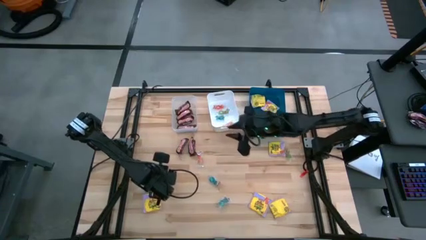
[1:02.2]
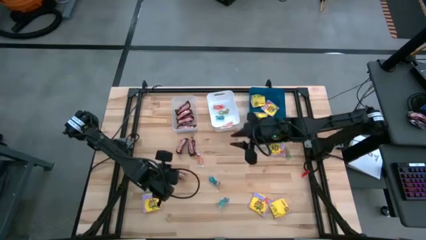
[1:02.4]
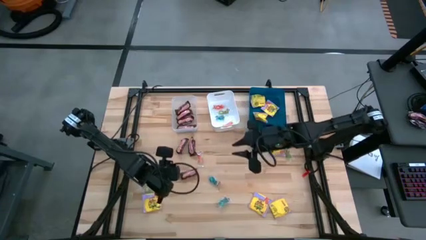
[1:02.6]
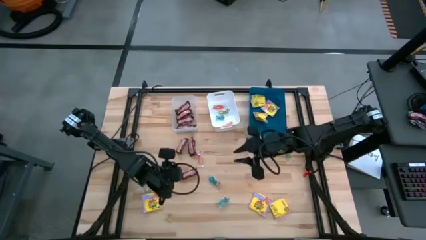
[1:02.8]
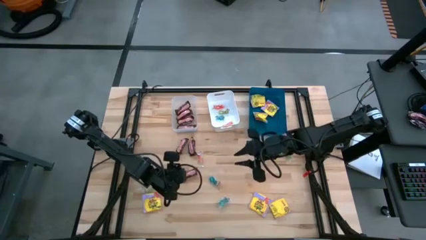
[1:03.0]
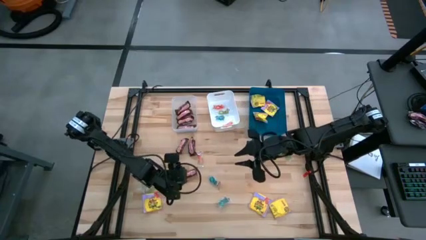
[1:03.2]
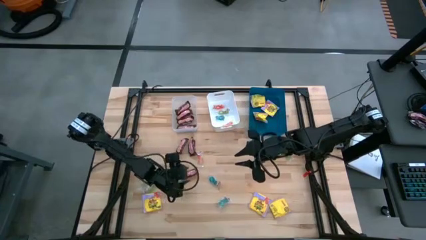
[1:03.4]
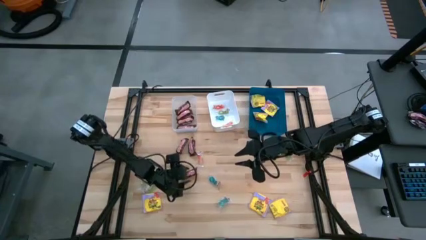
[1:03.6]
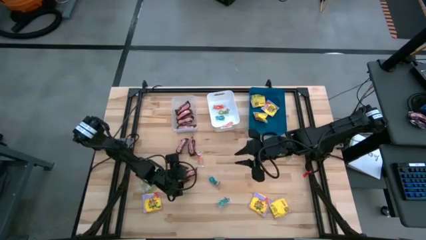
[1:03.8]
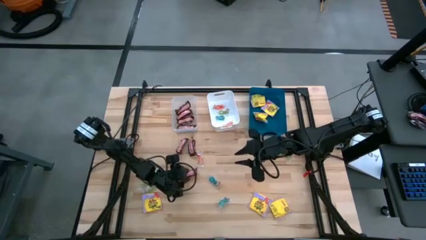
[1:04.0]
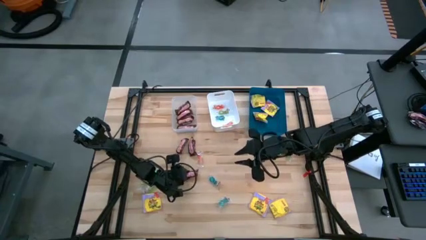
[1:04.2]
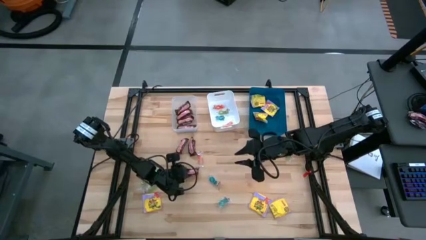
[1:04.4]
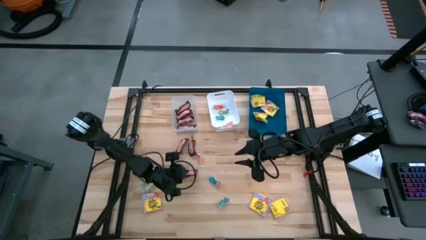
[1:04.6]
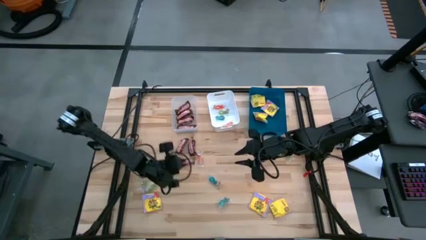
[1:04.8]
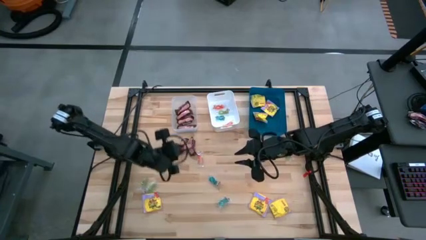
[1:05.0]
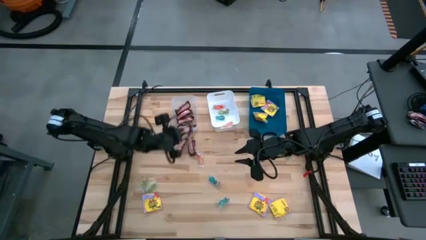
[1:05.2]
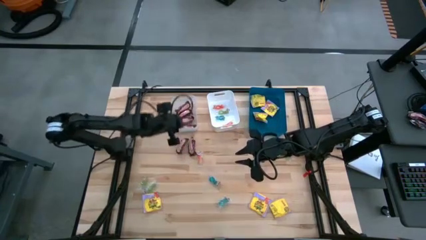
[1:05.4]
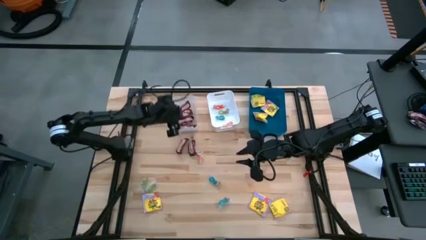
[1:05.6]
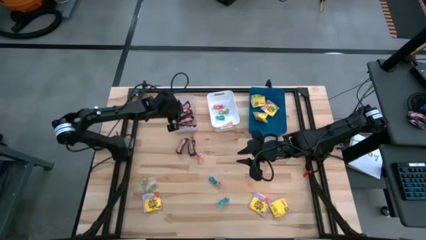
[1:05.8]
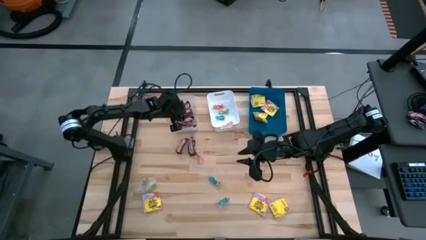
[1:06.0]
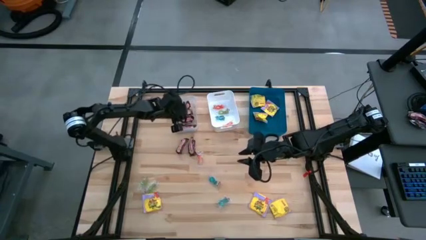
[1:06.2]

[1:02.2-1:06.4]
Task: Sort candy
Put the middle left brown candy bar into the transparent bin

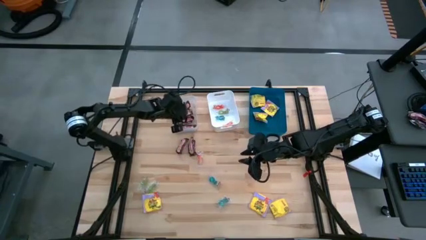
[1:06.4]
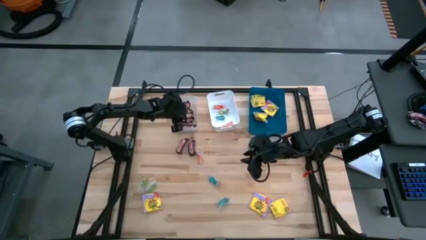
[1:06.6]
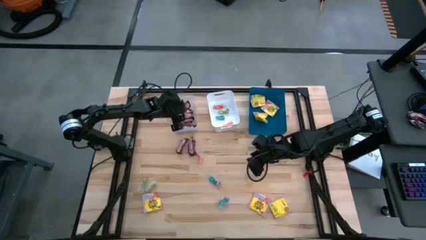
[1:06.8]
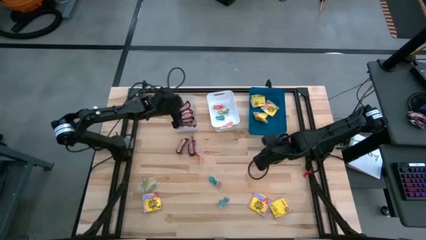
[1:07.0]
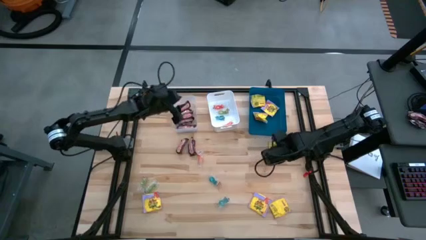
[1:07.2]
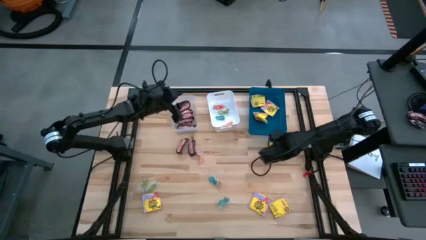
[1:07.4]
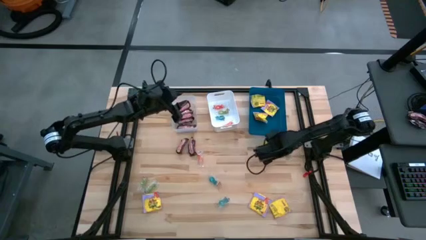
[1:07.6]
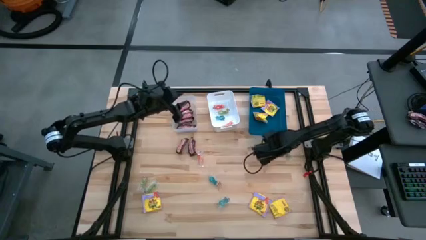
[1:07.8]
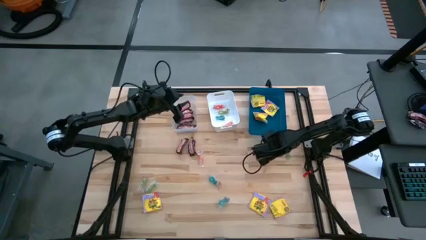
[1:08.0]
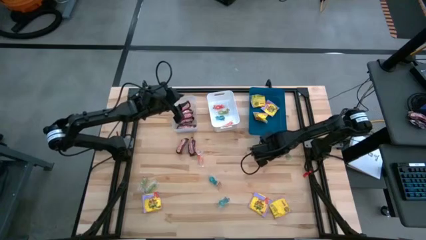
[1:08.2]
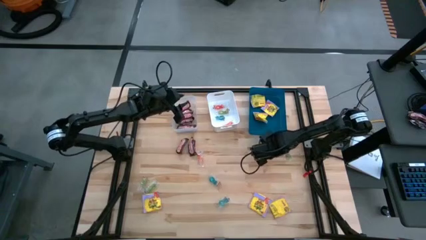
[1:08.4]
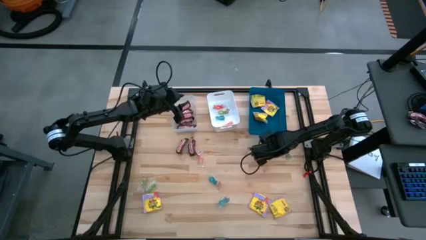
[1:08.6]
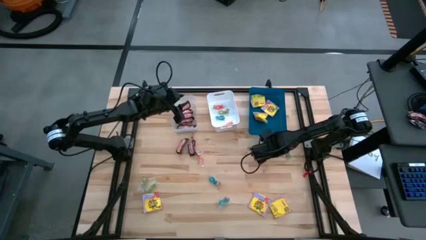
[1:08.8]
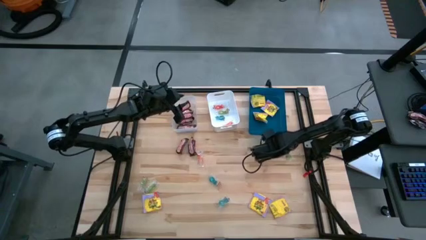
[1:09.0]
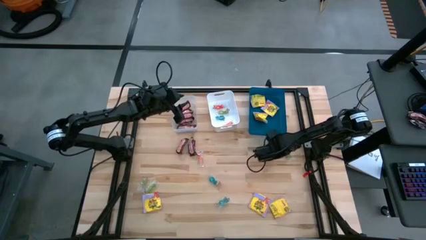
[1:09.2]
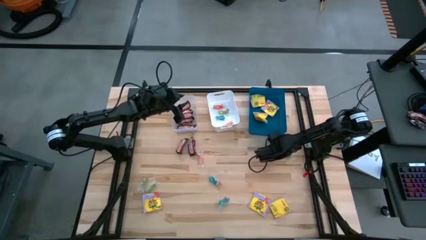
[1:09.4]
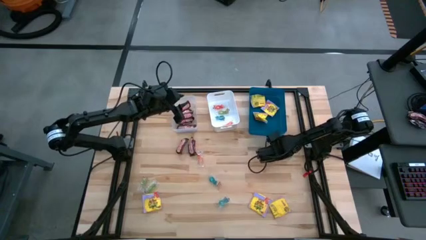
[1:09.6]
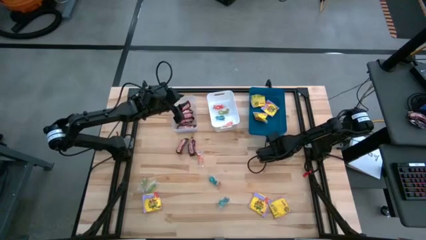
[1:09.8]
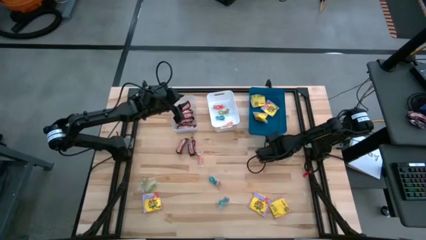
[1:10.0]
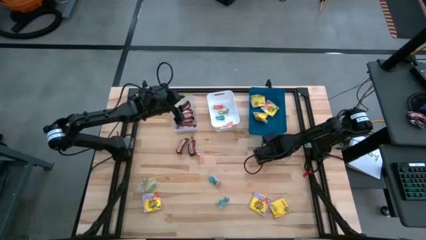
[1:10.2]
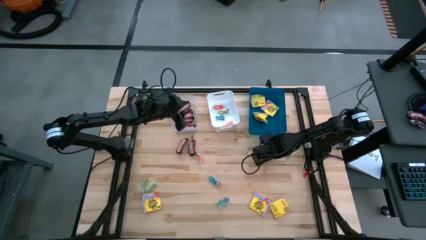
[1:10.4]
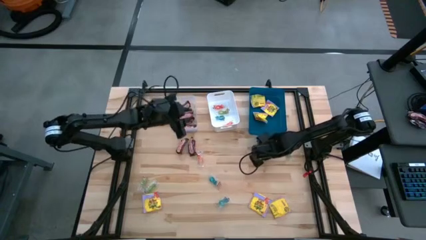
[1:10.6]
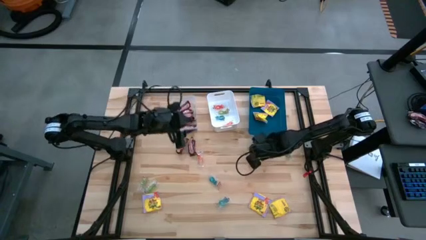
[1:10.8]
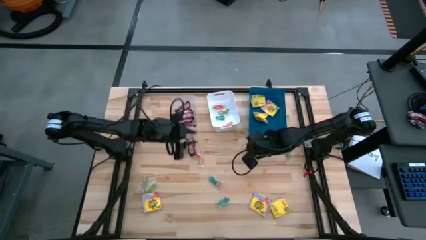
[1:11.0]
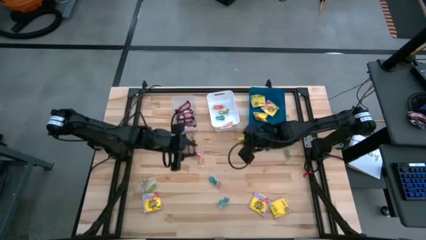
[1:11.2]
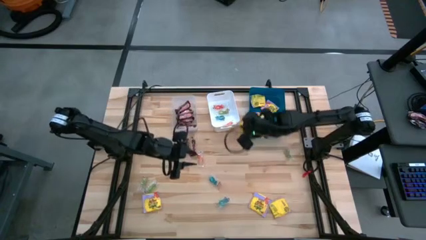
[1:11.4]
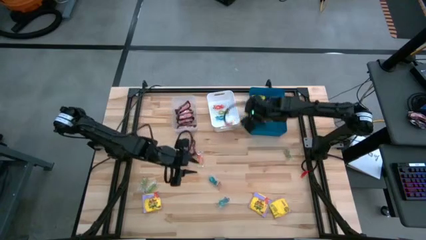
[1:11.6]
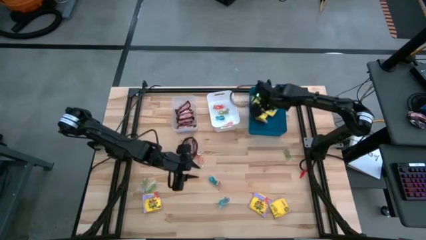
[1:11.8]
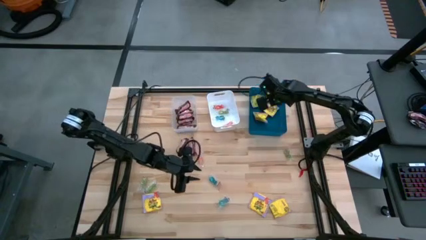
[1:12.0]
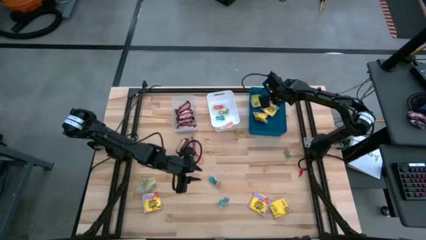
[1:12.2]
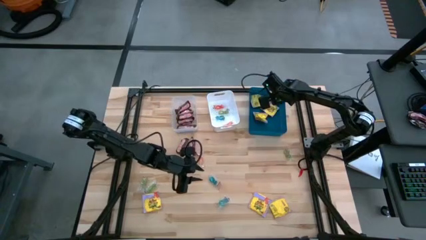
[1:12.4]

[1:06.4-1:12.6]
Put the top right yellow sour patch candy into the blue bin

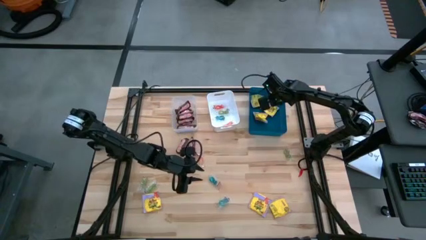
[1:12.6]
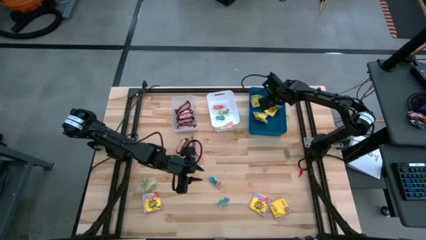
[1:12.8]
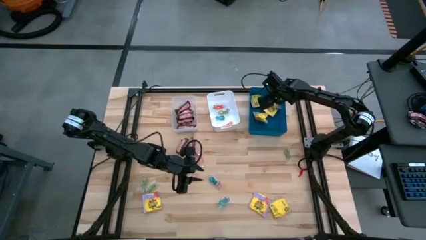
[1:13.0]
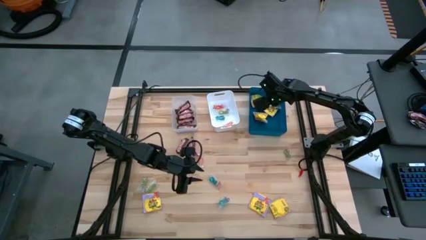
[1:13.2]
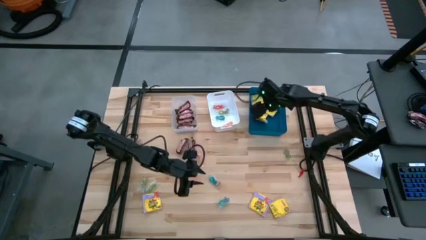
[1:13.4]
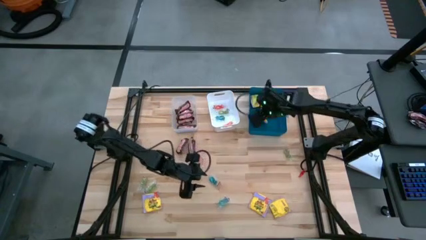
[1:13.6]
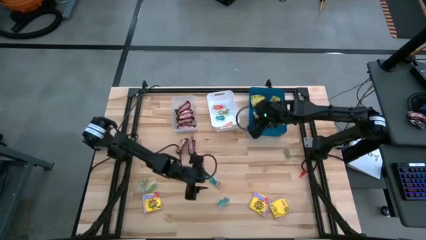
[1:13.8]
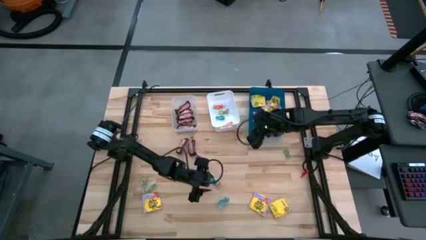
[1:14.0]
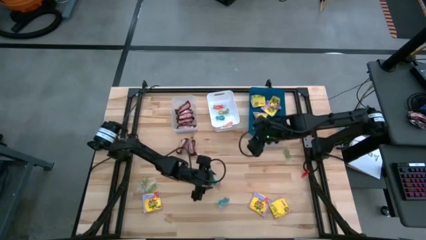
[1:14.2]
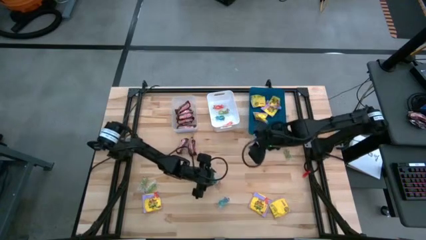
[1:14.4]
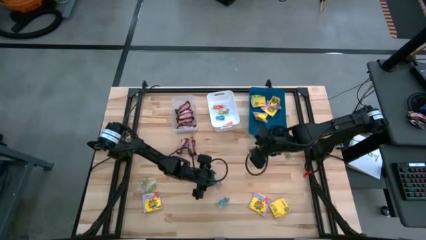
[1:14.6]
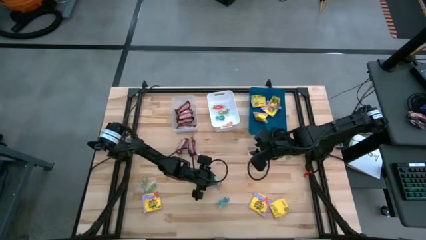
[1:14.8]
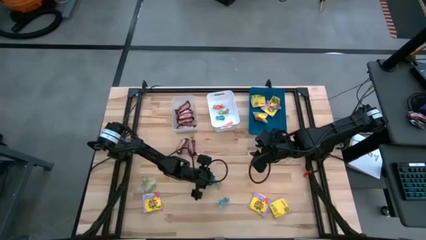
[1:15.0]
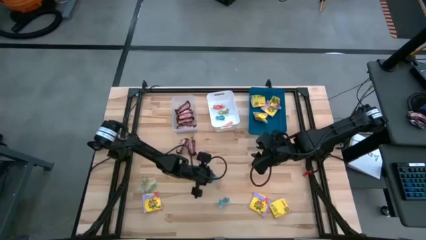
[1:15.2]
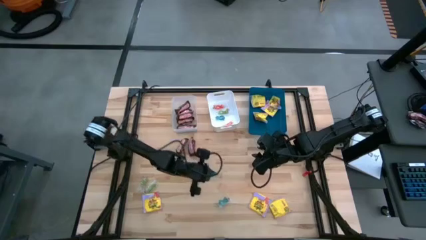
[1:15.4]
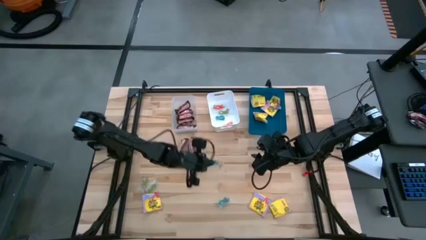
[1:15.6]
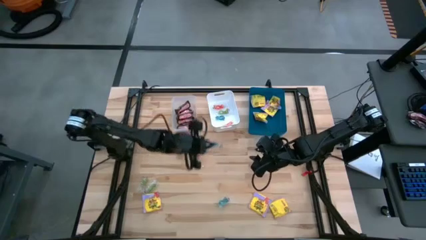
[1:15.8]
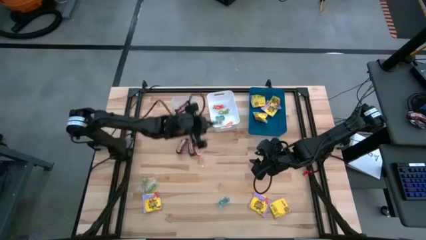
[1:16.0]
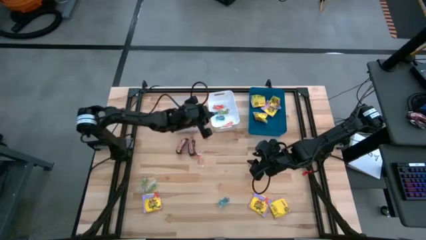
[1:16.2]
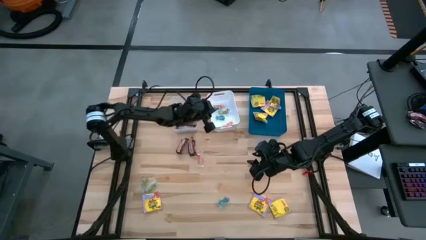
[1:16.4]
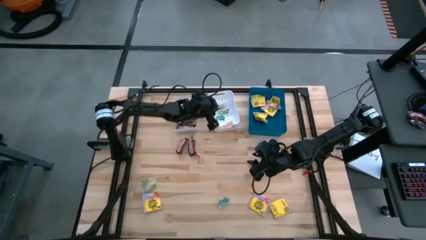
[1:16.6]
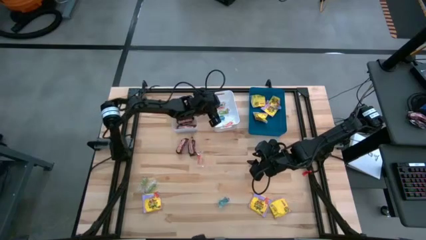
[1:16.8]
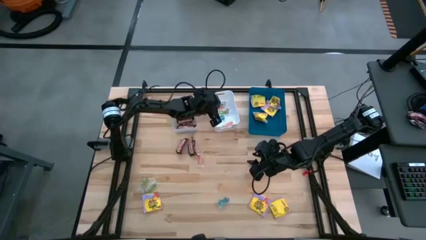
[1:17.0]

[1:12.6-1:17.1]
Put the top blue jelly candy into the white bin

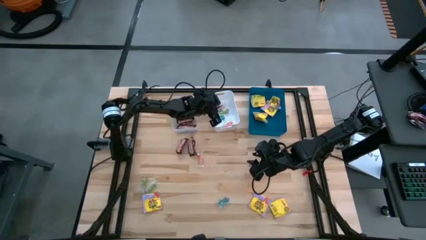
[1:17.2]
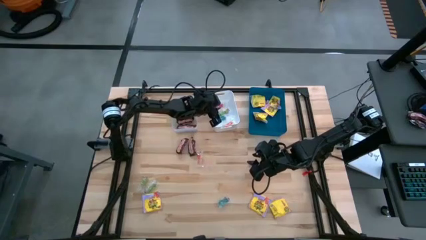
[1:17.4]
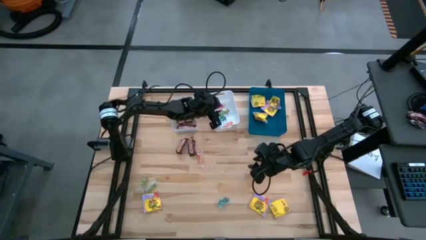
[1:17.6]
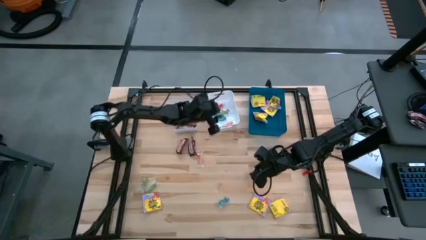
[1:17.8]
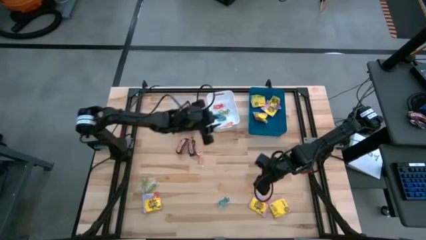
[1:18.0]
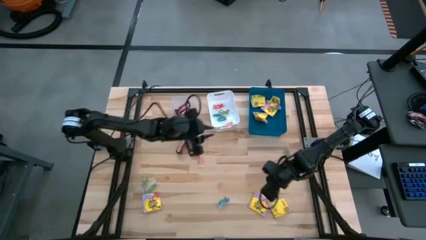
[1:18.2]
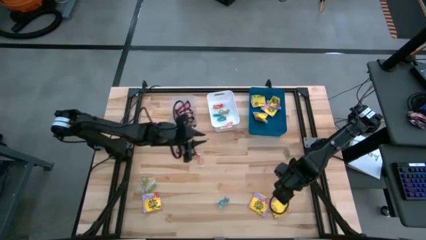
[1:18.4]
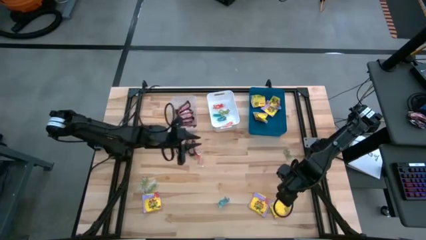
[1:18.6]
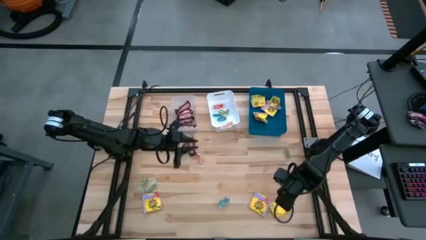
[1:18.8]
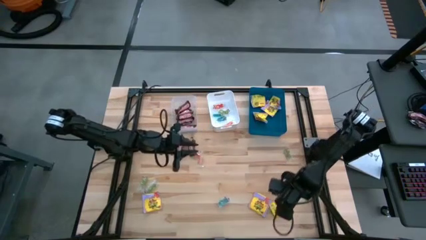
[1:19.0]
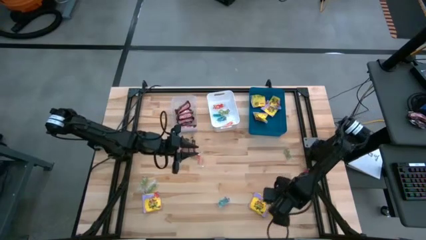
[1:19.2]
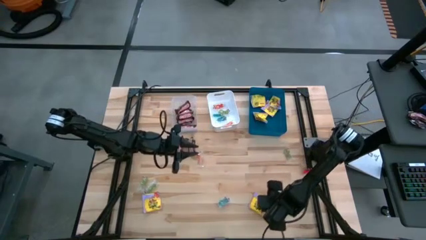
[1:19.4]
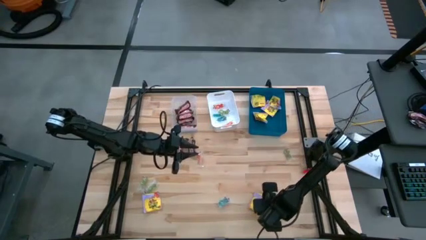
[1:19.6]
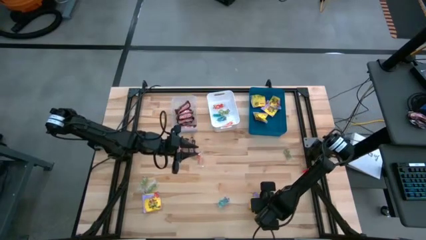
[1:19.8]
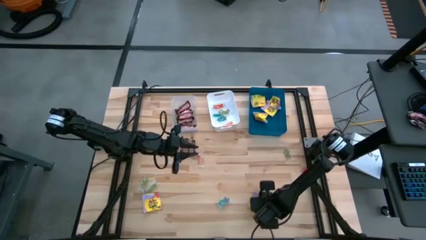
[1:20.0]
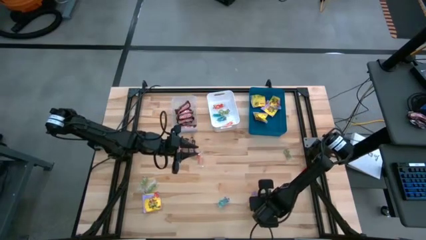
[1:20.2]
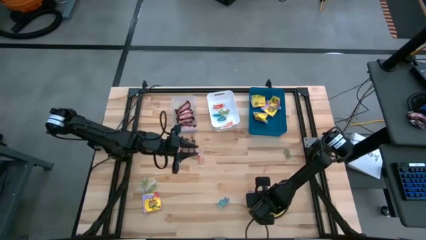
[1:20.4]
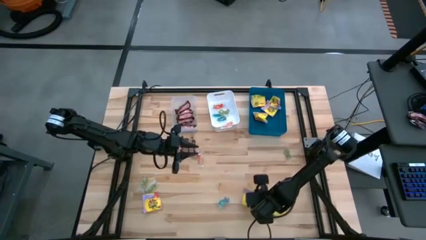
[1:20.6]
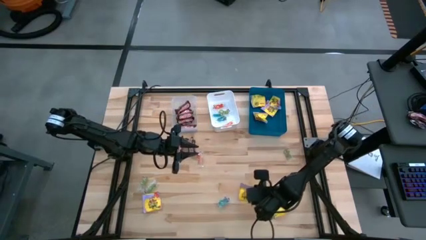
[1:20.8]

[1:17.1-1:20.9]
Put the bottom right yellow sour patch candy into the blue bin
